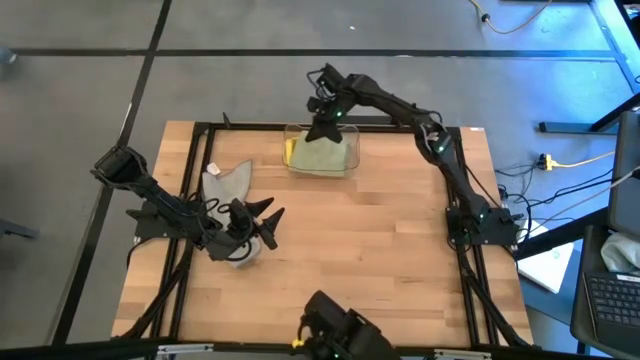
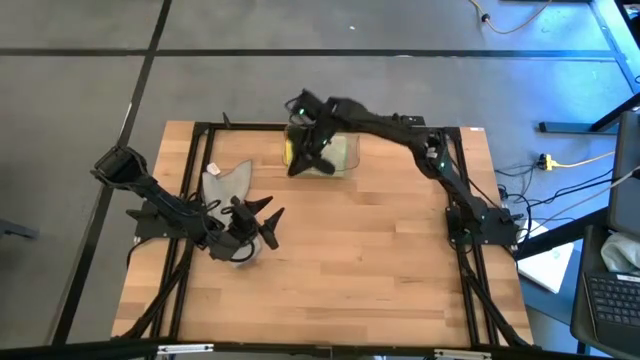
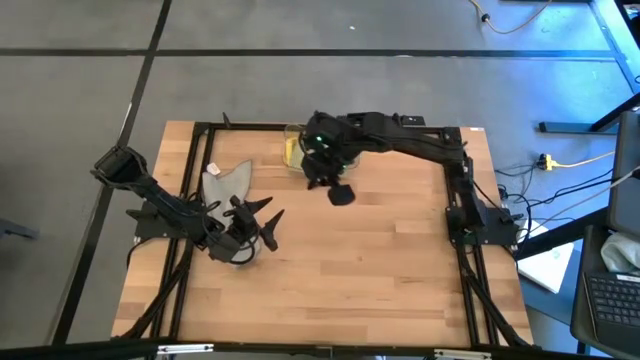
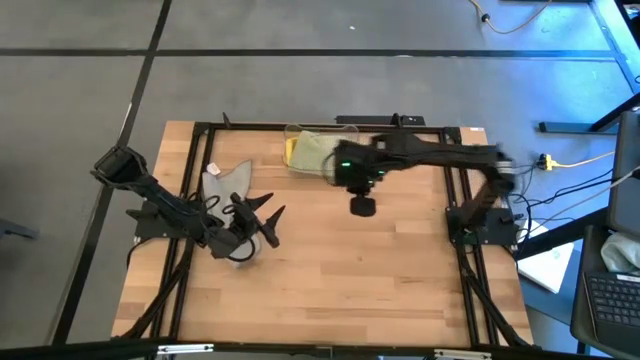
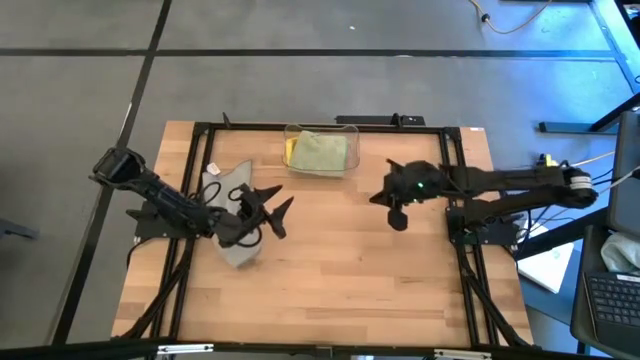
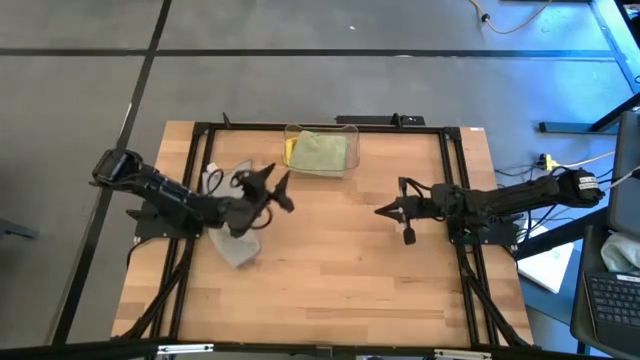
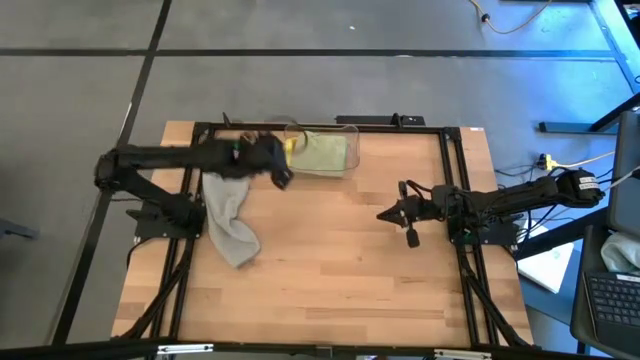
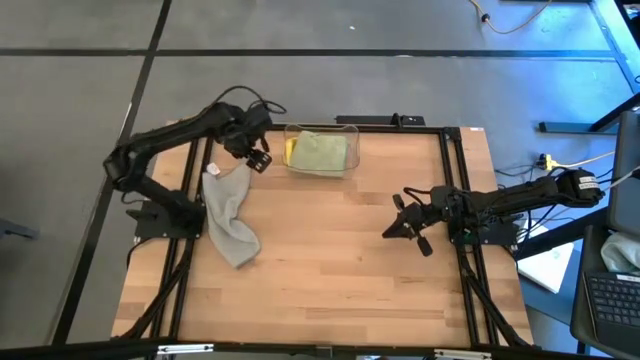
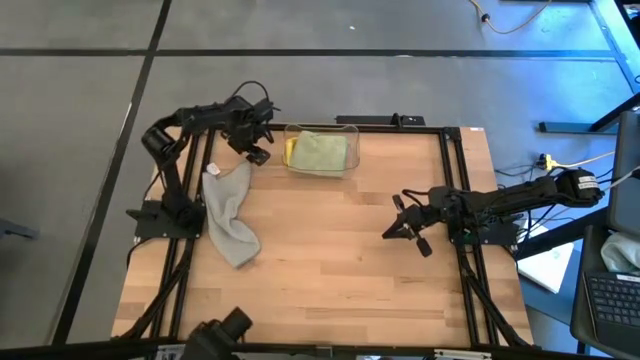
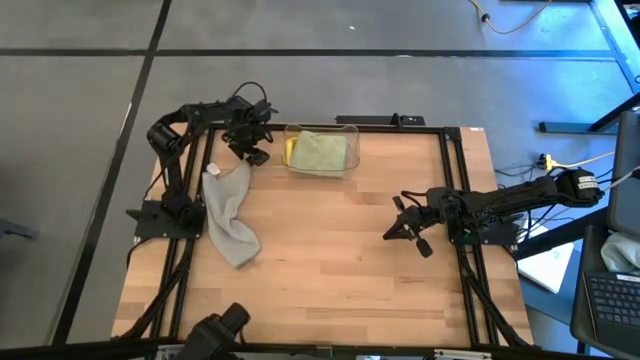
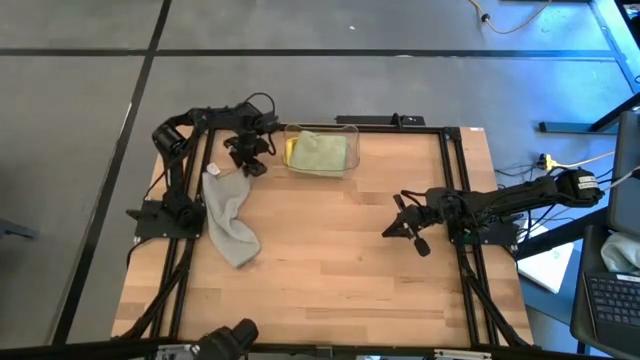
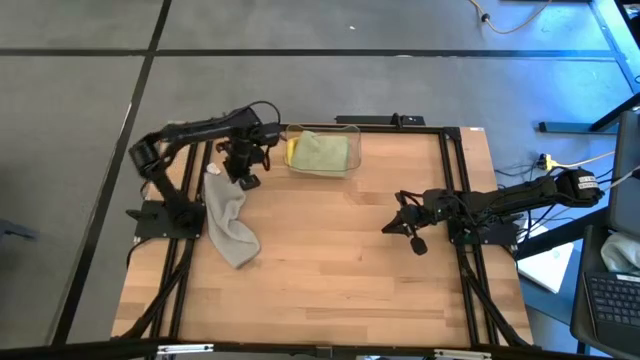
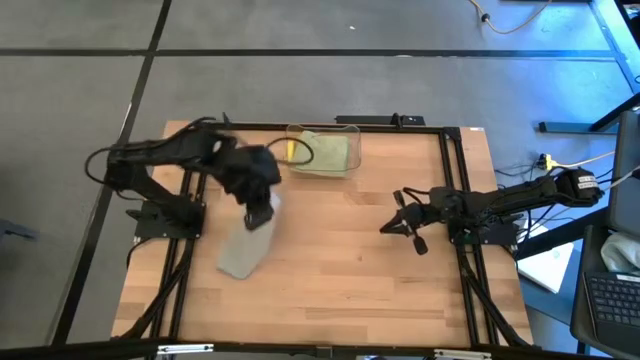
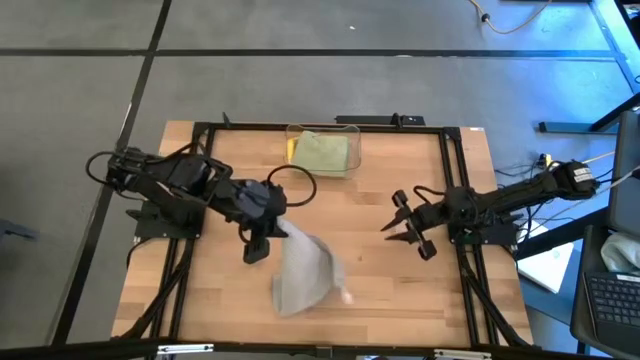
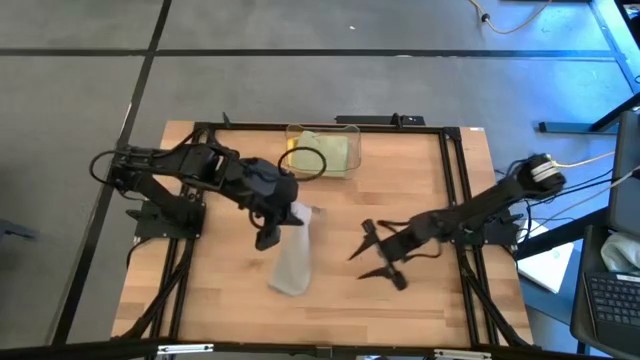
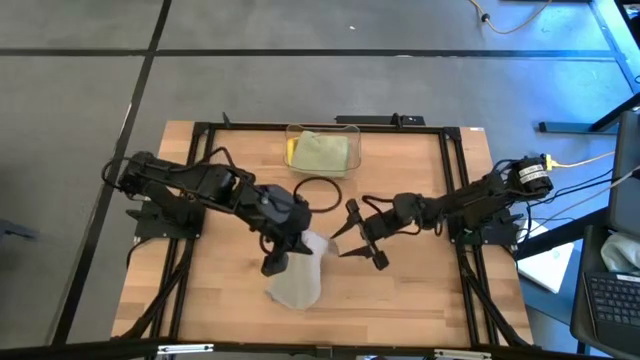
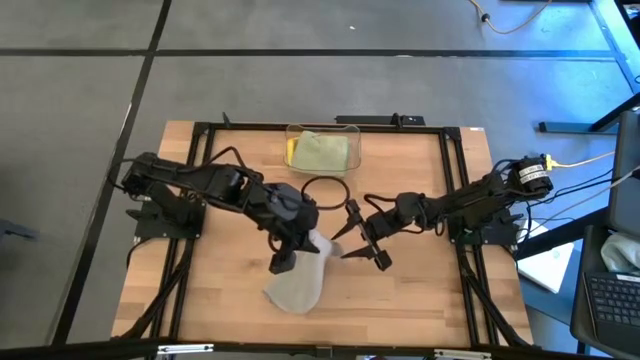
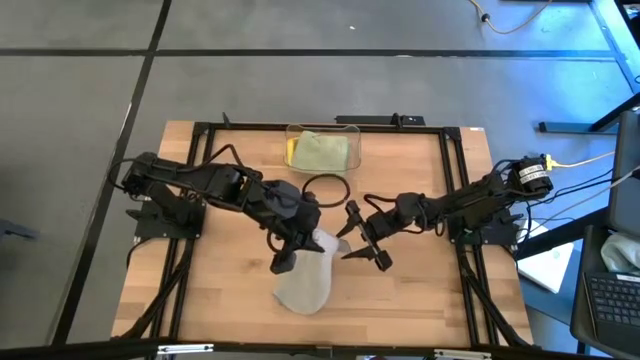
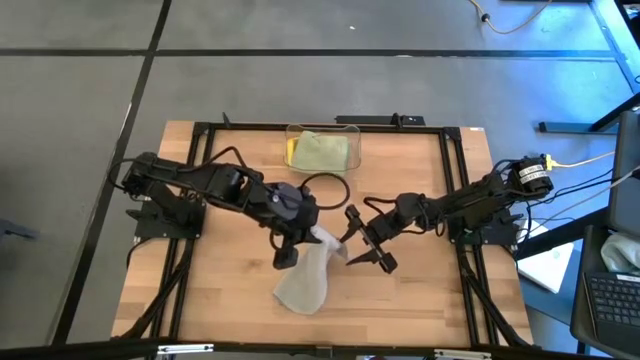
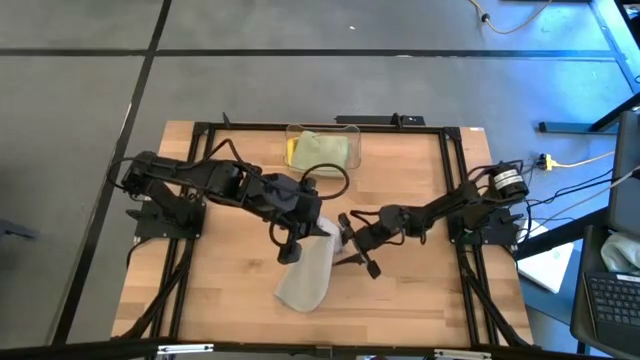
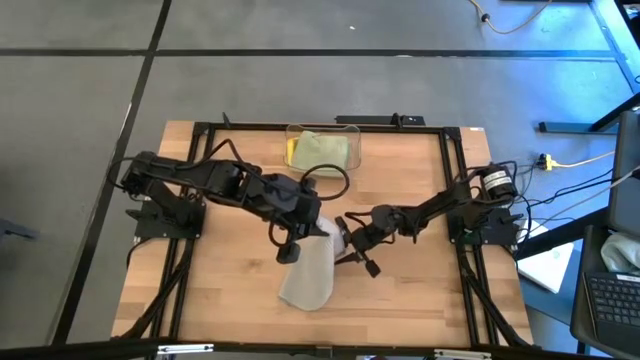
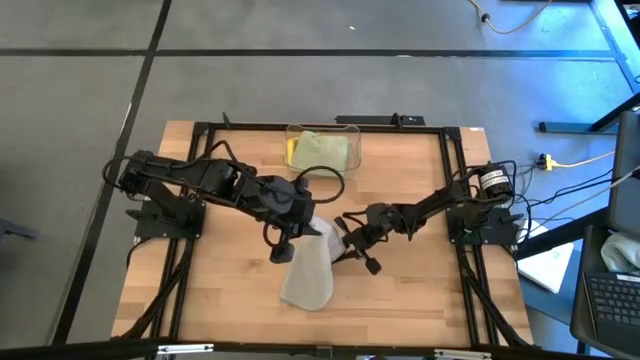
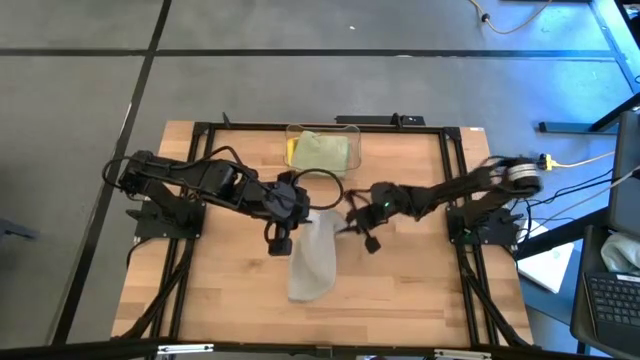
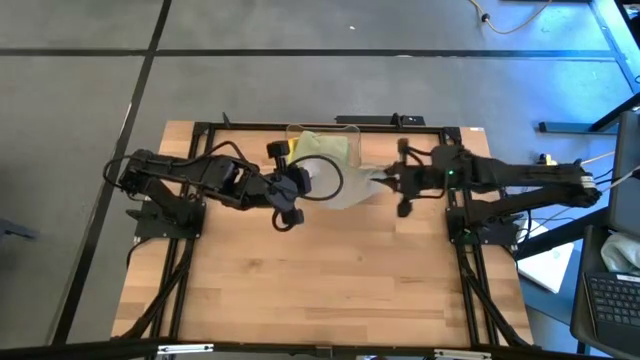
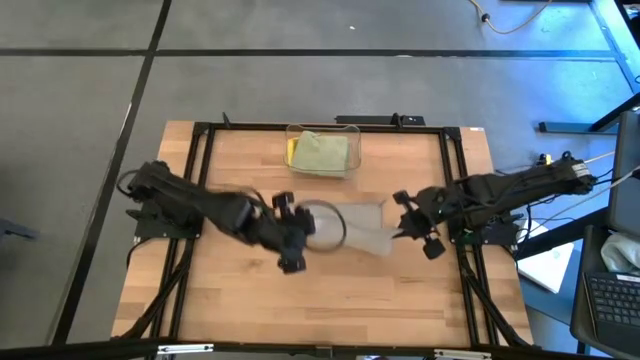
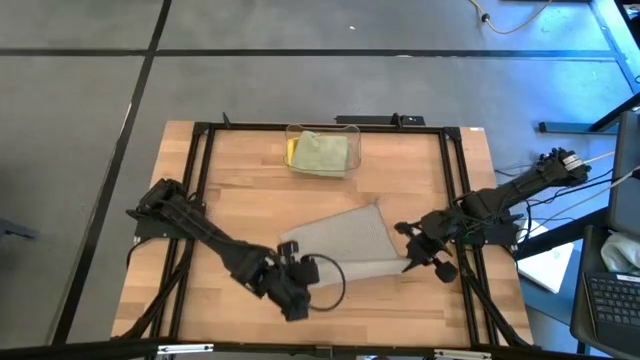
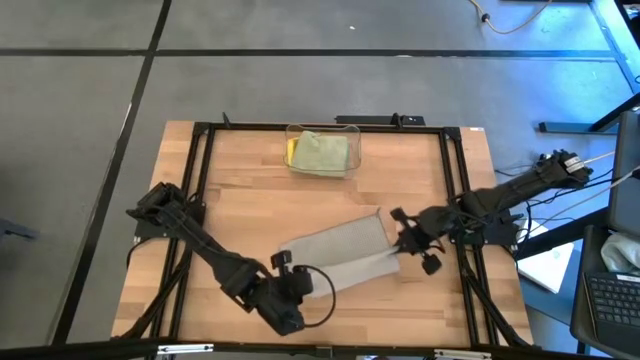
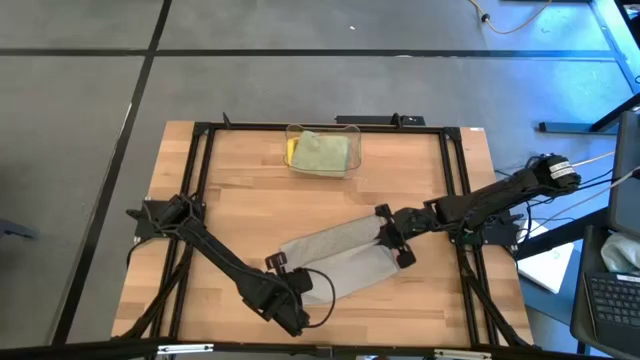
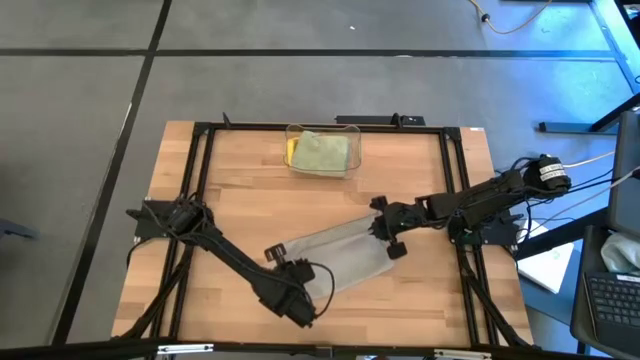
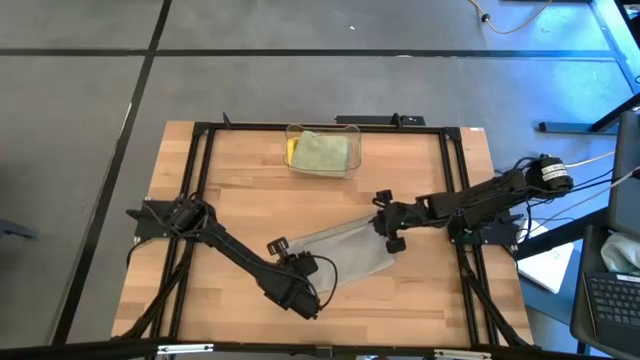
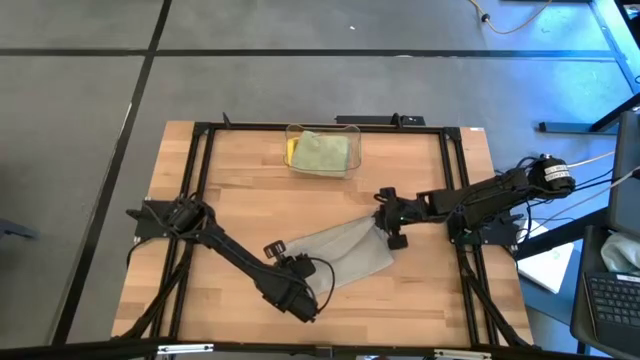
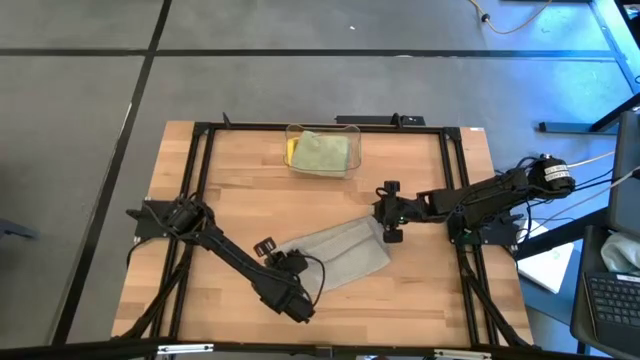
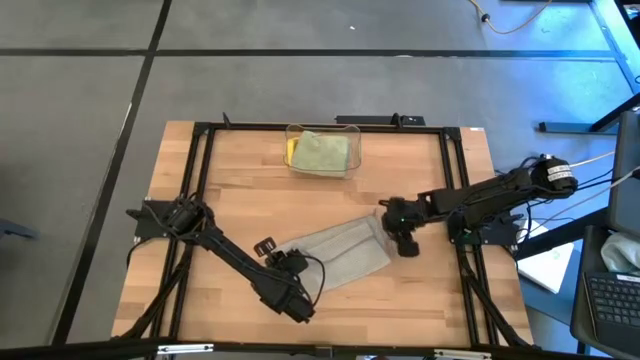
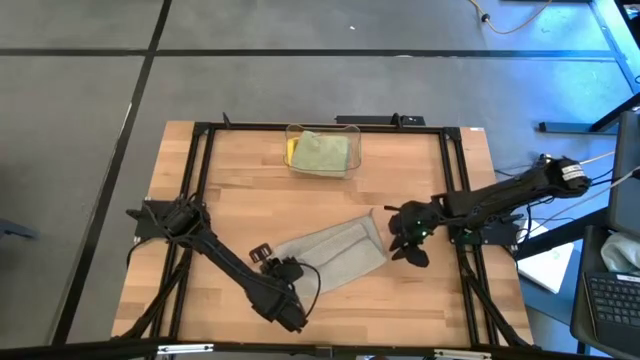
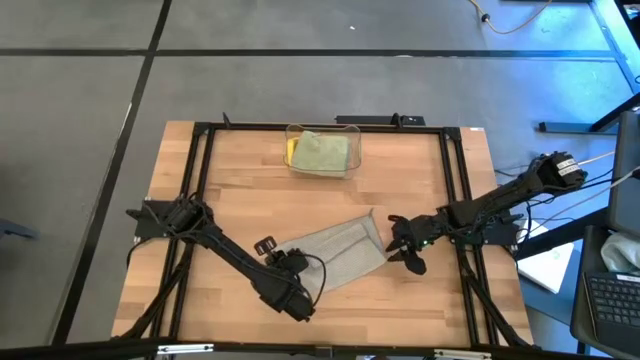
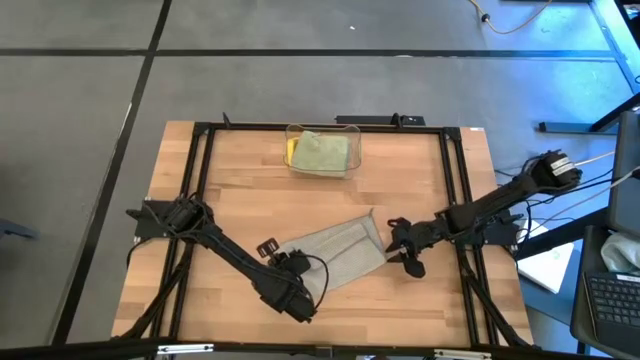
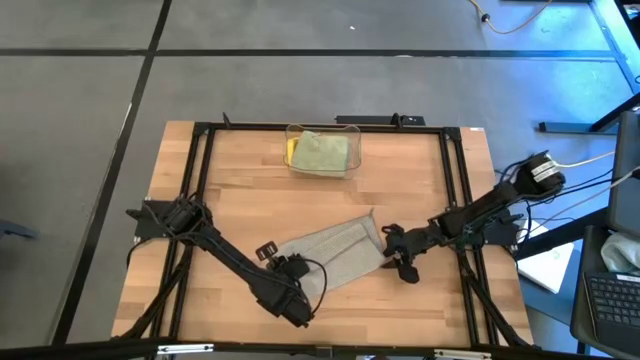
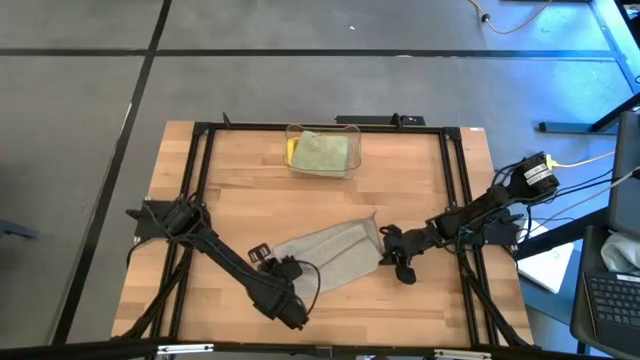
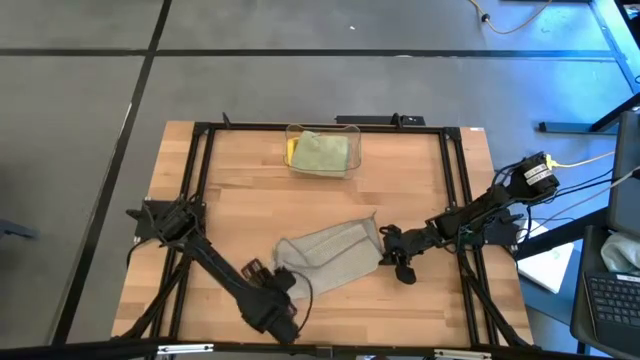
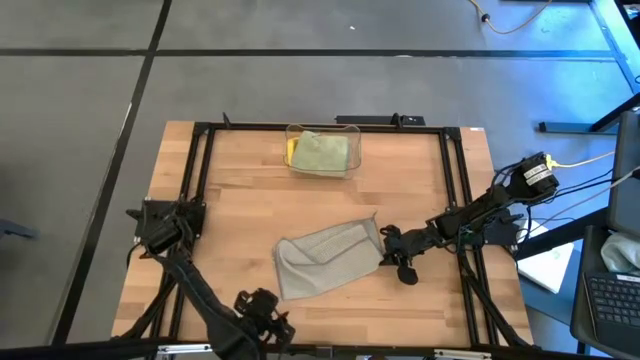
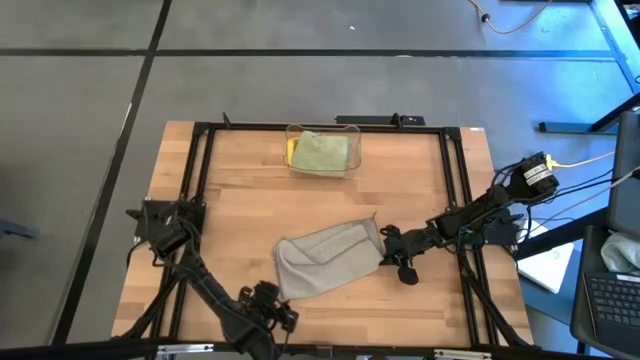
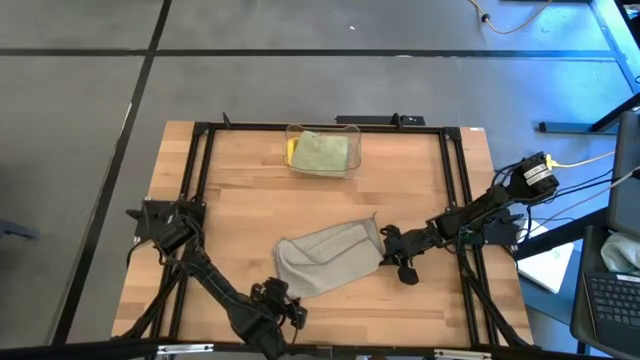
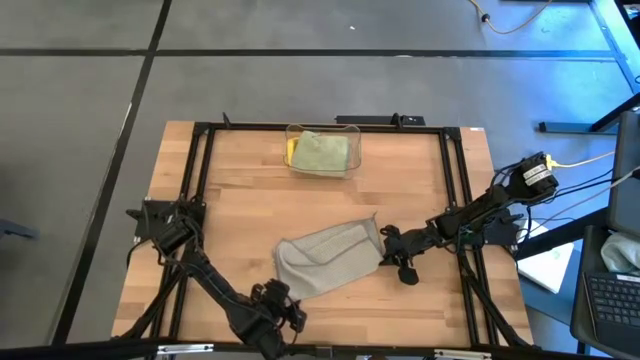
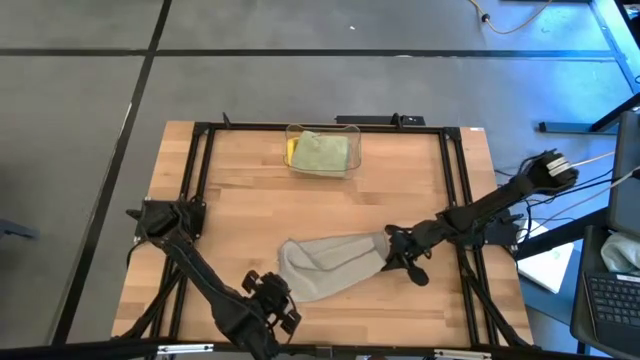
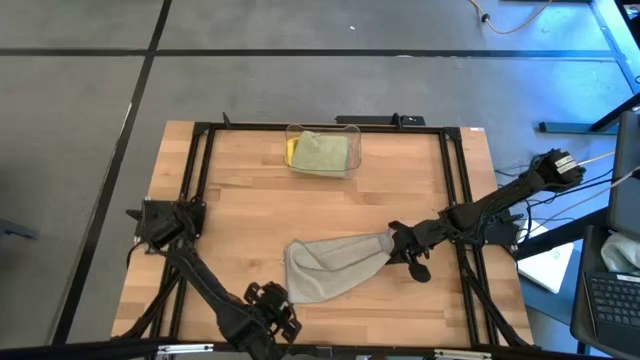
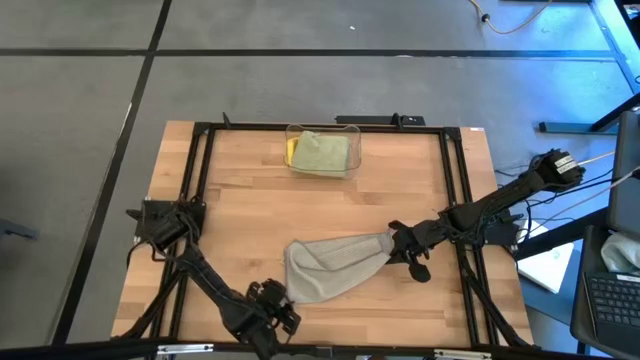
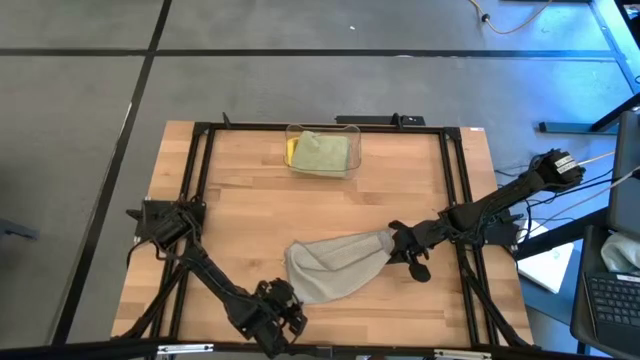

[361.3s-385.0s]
Task: Fold microfiber towels
Fold the gray microfiber cloth
